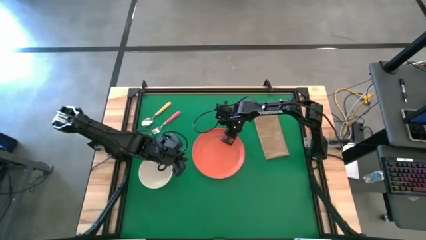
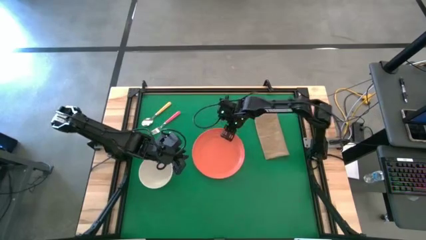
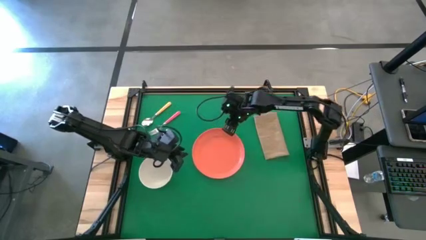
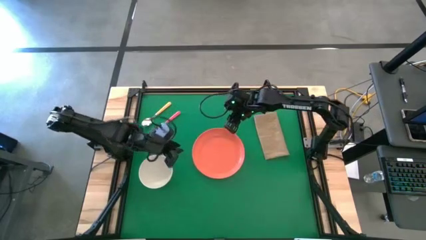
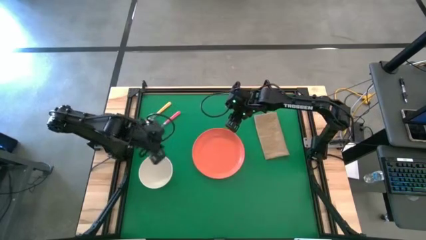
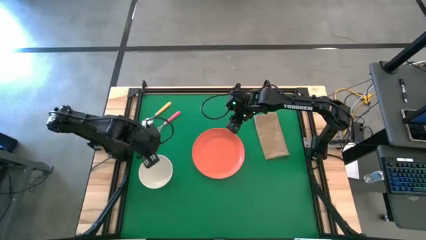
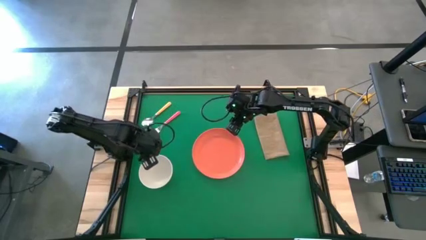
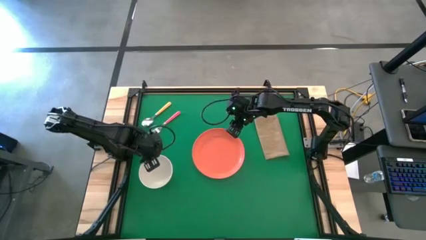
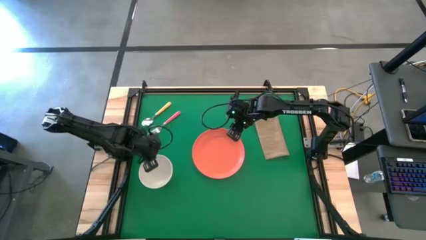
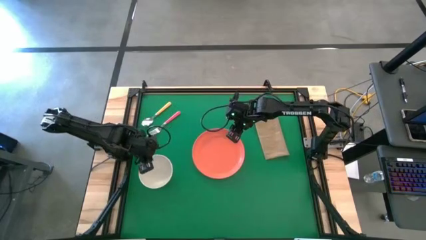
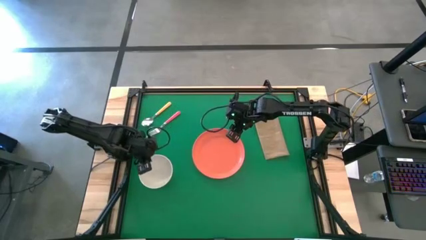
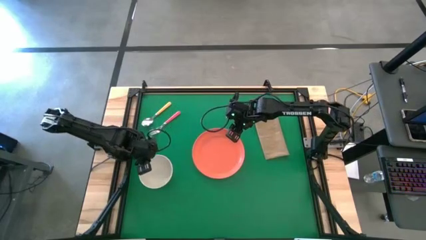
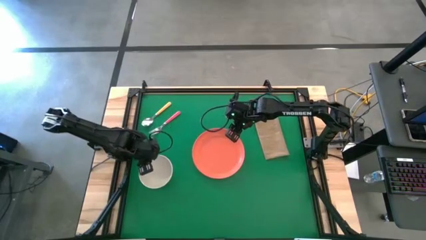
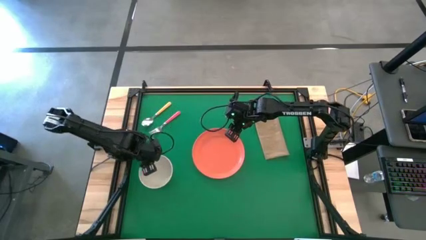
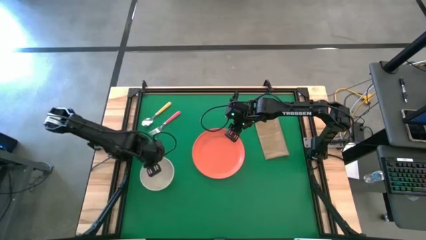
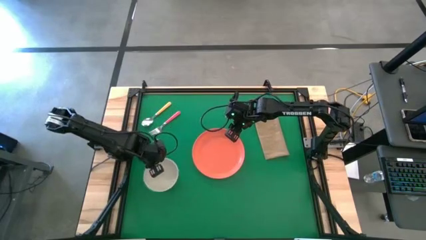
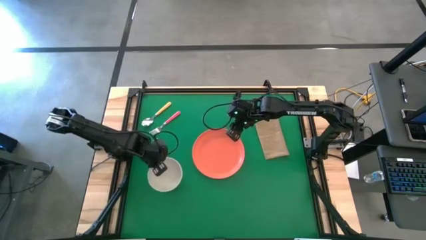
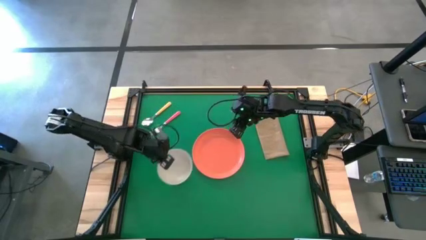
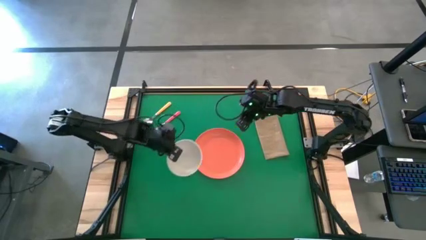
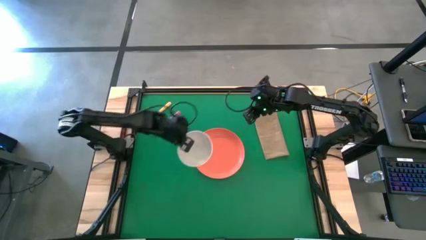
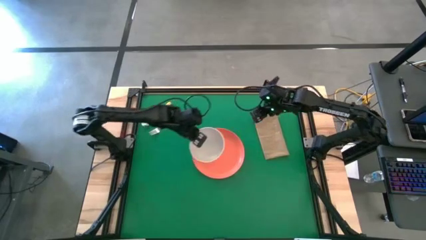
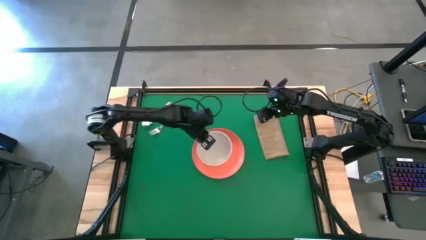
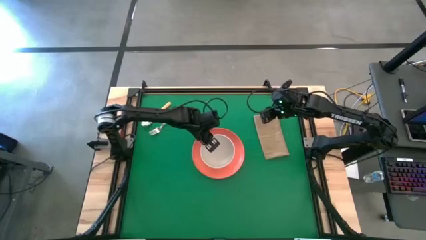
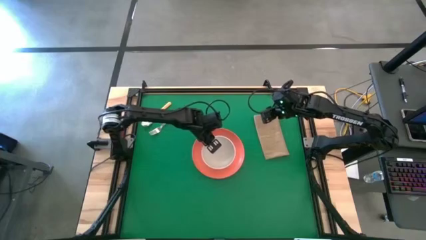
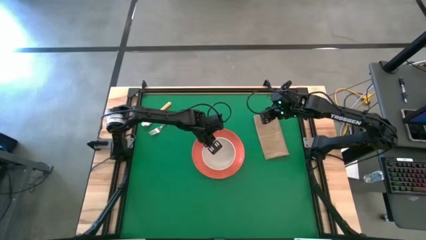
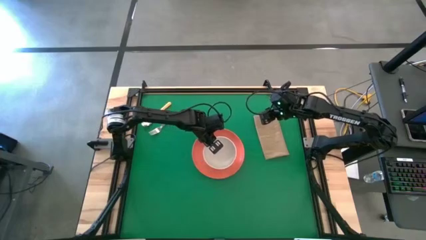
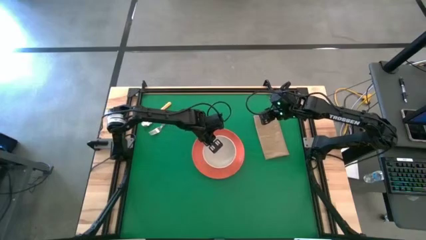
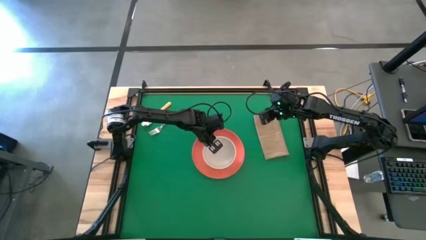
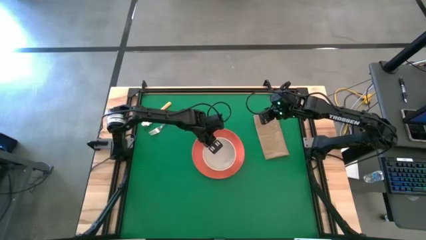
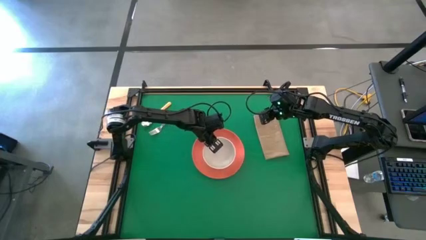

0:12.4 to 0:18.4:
Task: Set table place
Put the white bowl on the orange plate

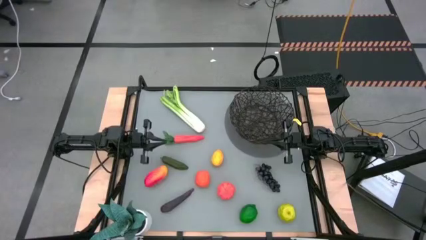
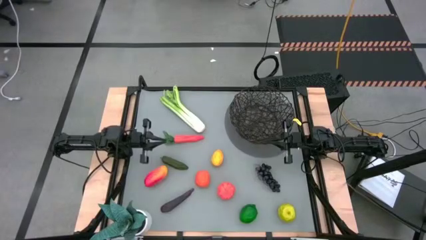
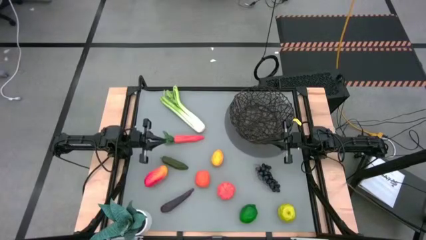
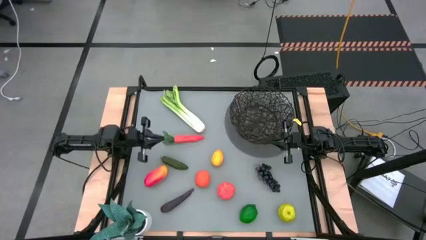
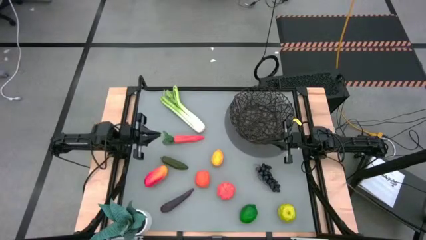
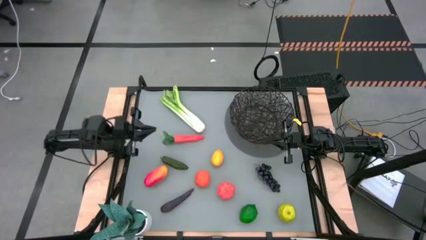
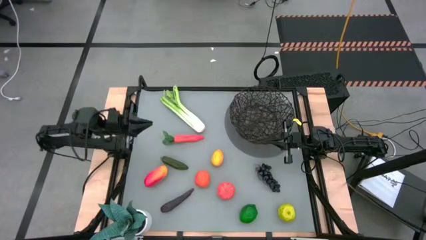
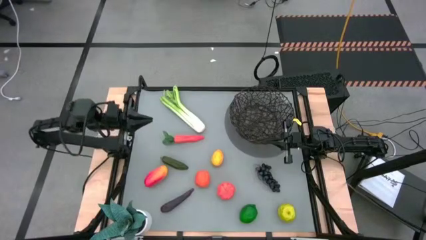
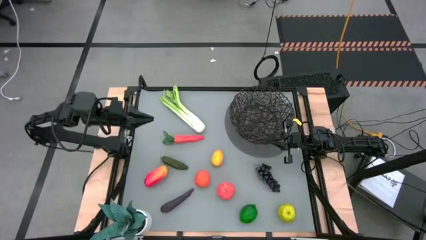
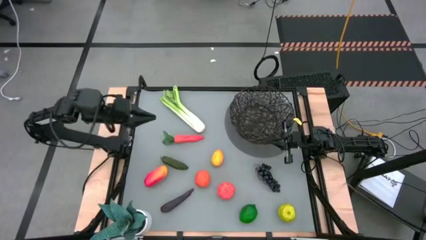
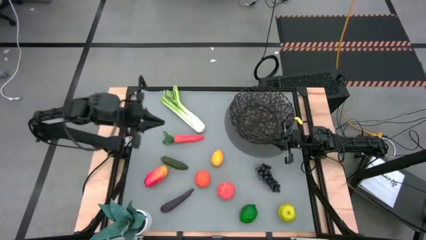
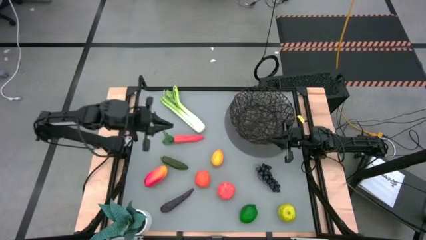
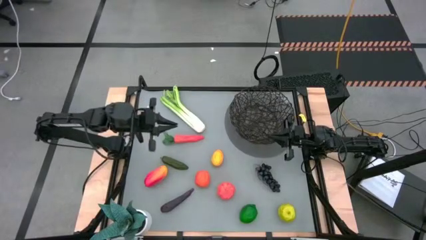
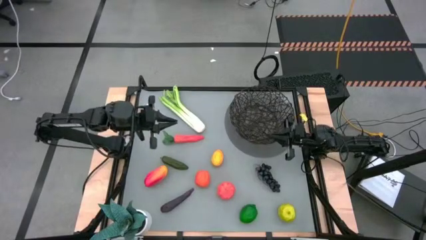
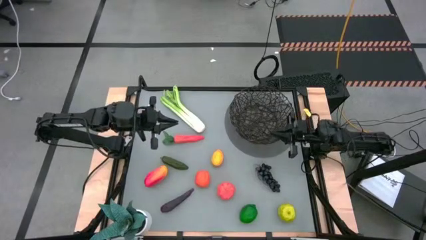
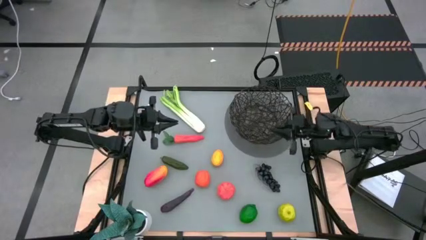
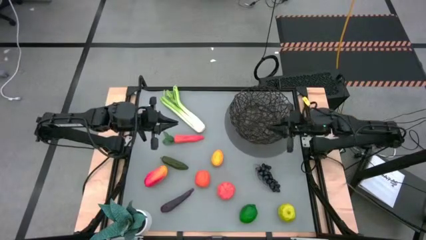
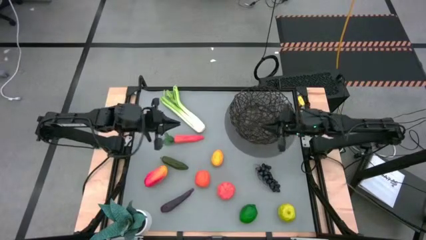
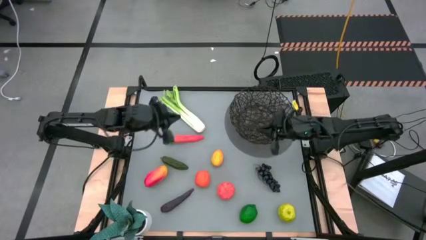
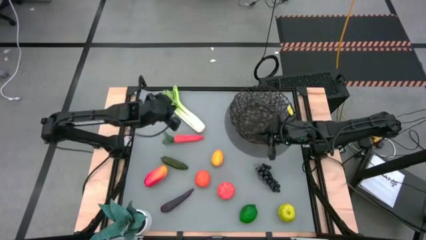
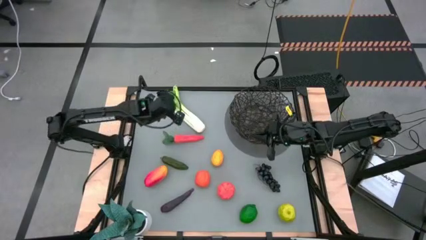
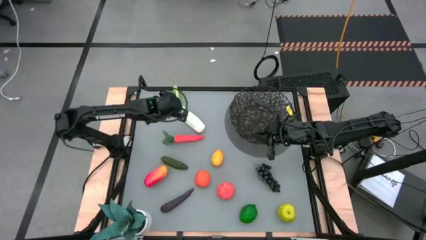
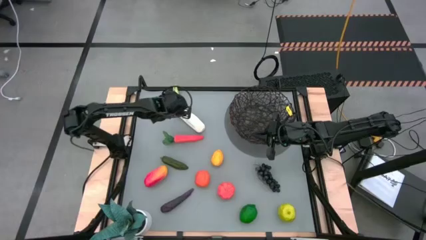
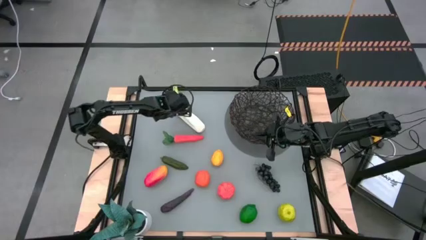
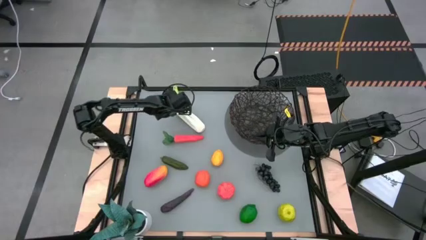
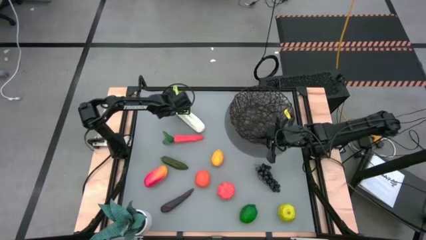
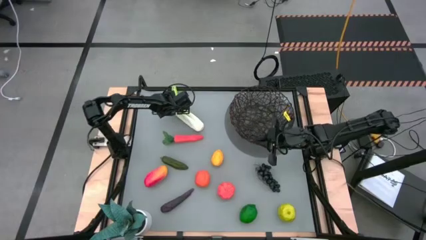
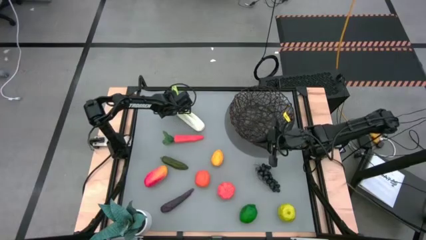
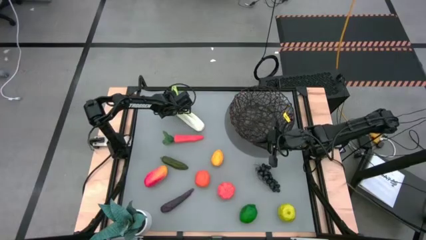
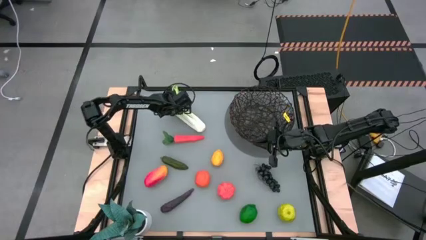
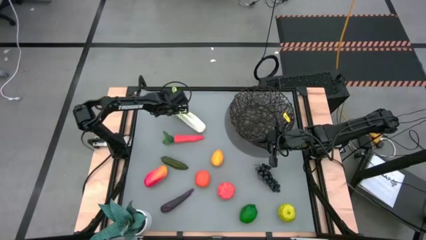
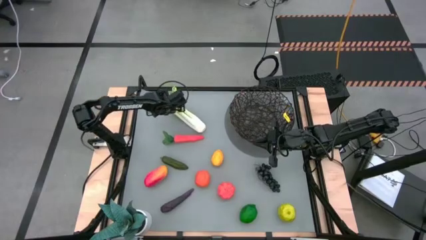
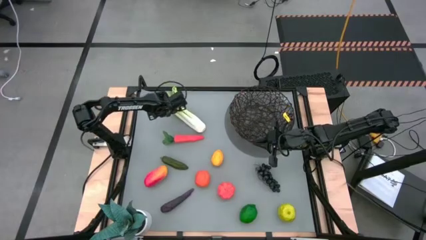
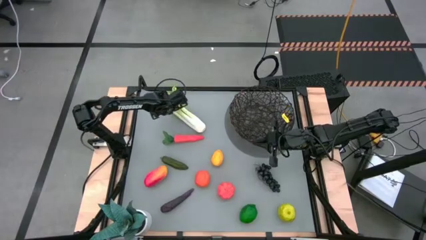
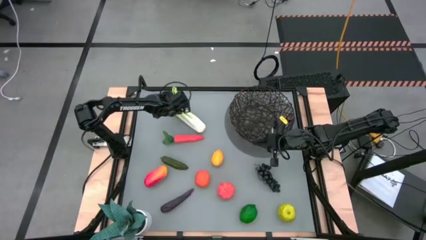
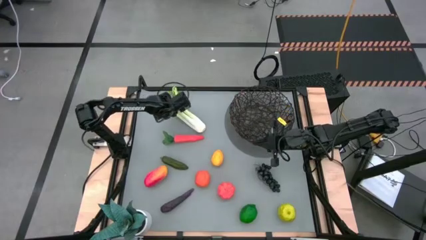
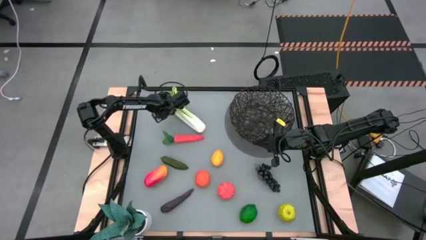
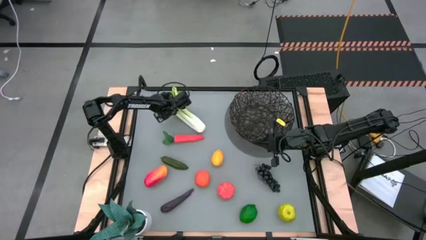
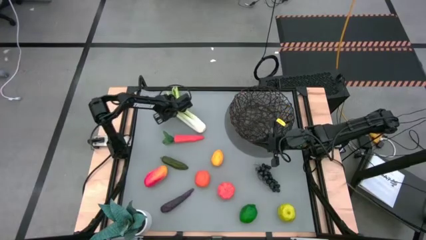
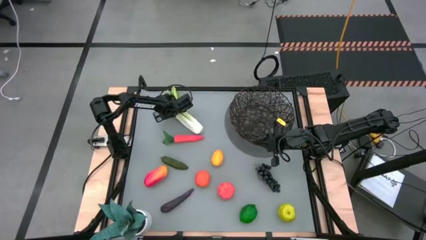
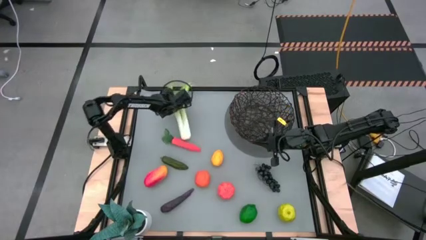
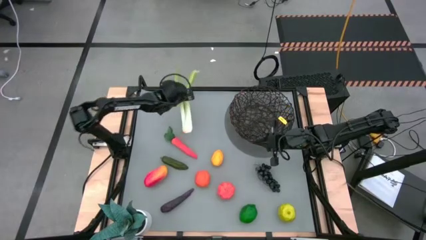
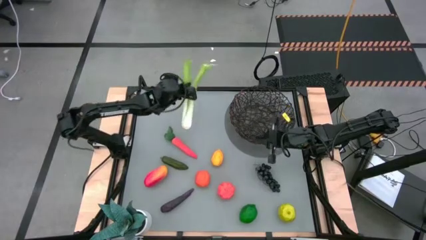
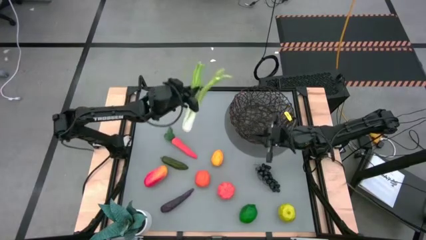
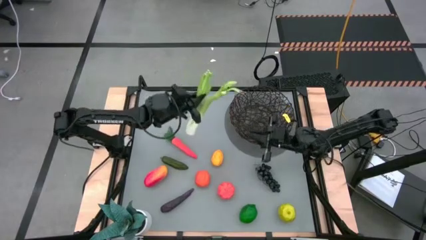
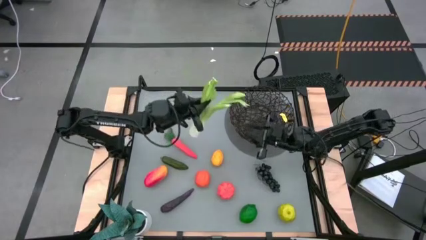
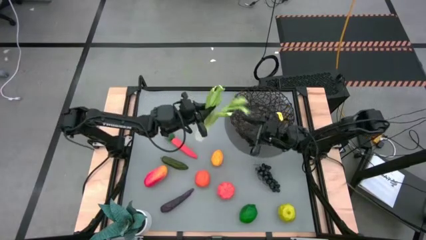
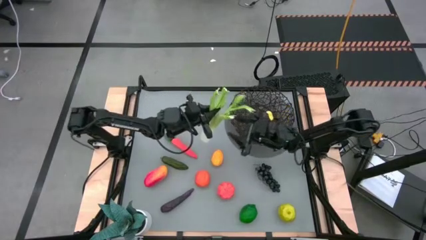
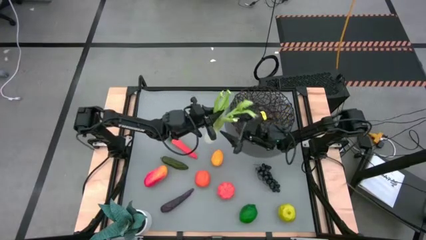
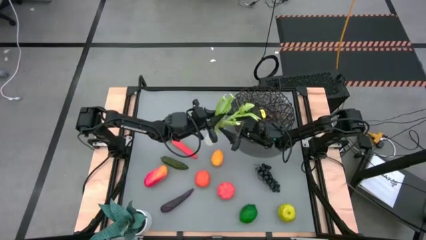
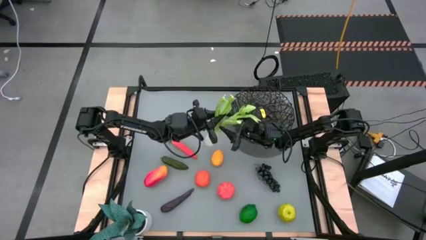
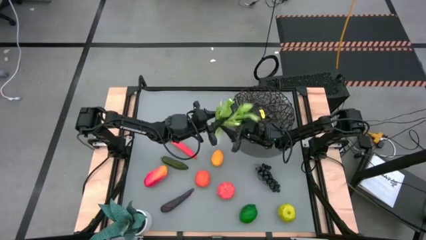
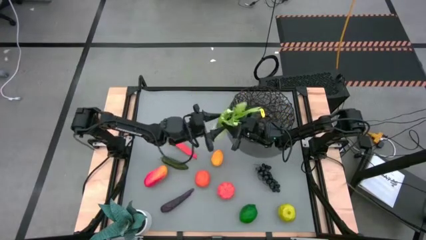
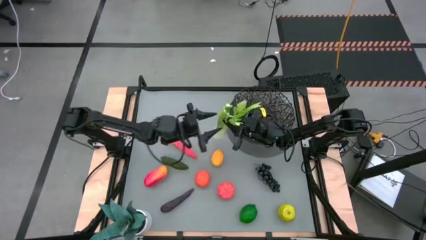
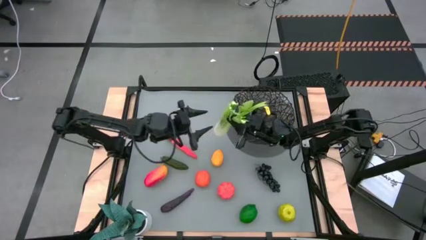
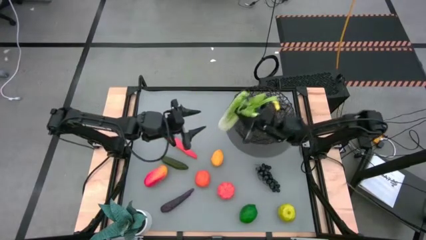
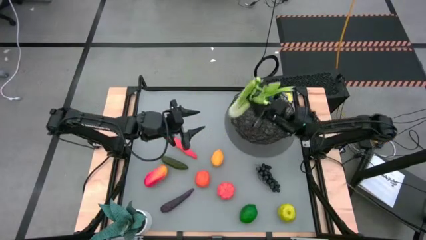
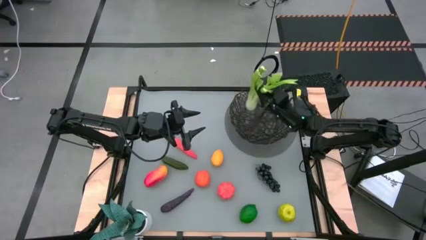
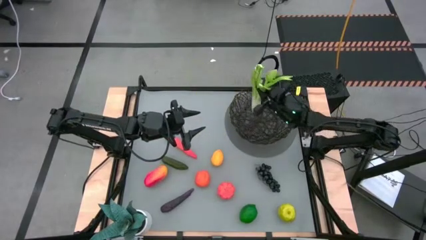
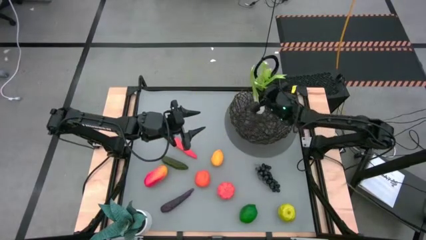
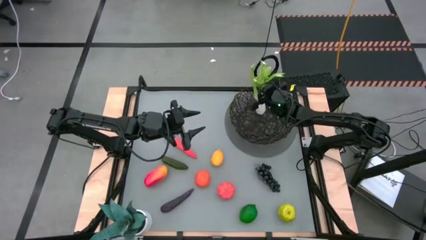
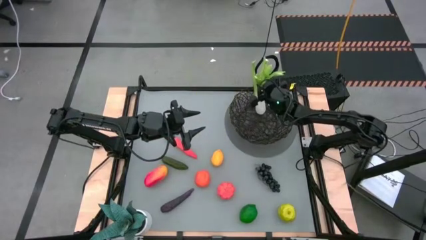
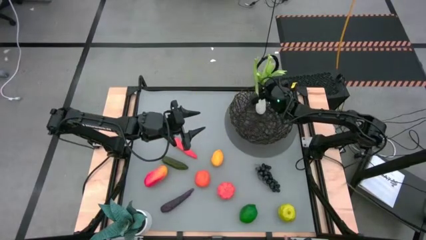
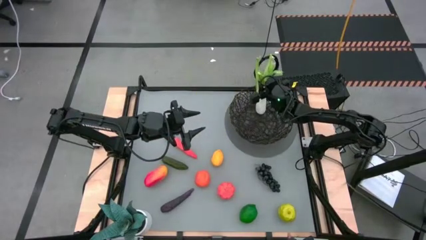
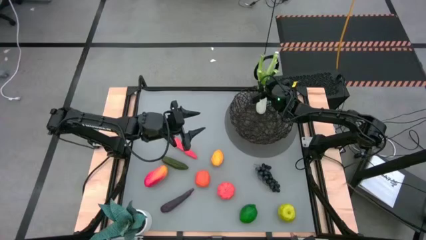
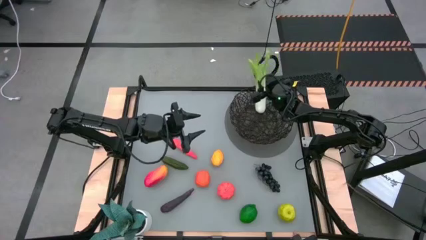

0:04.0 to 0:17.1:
Task: Build produce basket
Put the celery into the black wire basket
